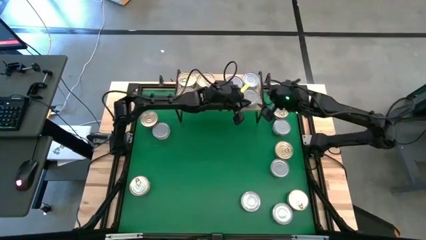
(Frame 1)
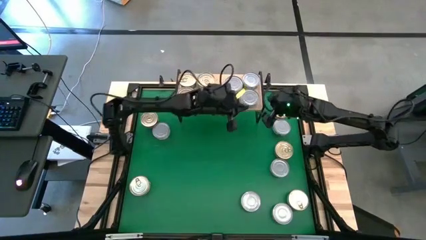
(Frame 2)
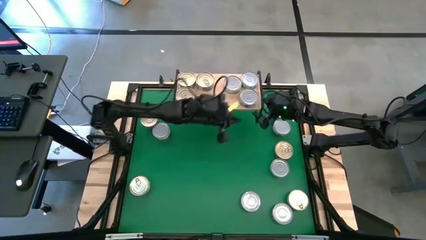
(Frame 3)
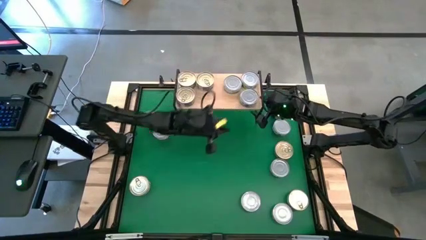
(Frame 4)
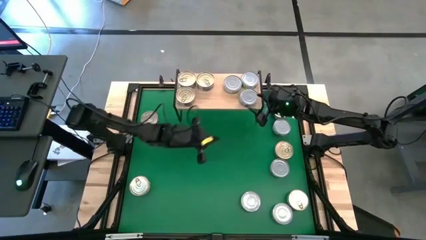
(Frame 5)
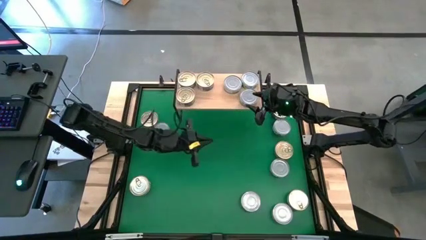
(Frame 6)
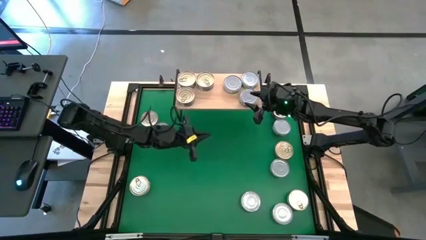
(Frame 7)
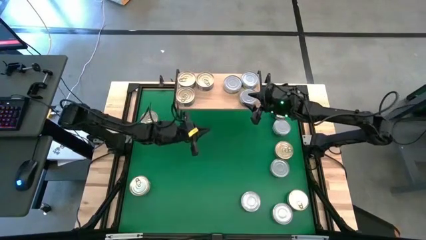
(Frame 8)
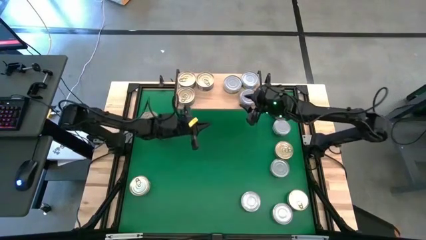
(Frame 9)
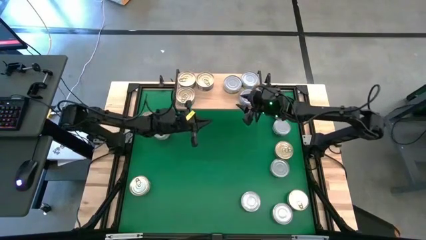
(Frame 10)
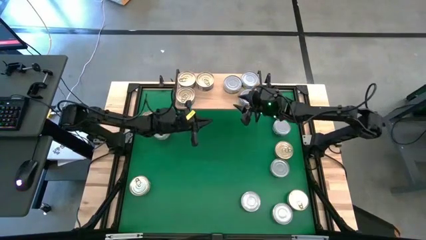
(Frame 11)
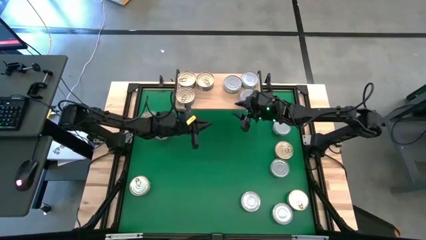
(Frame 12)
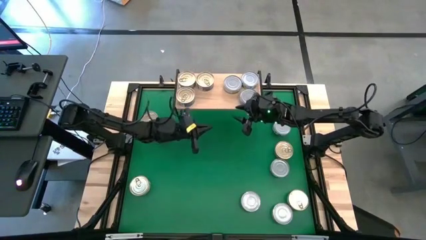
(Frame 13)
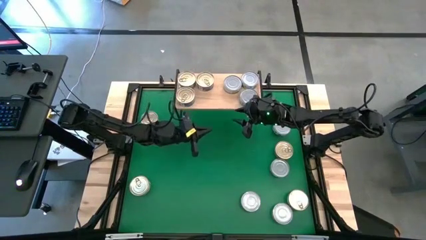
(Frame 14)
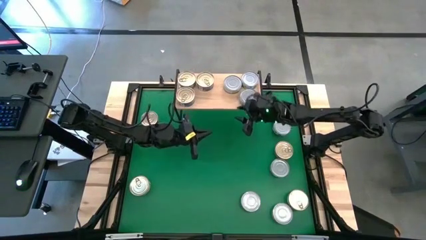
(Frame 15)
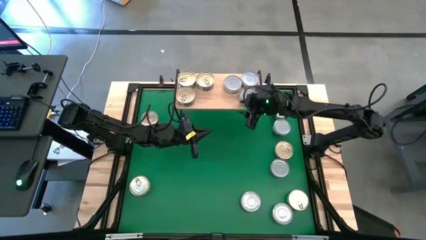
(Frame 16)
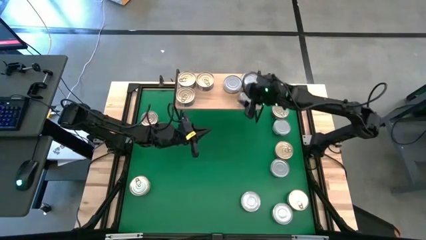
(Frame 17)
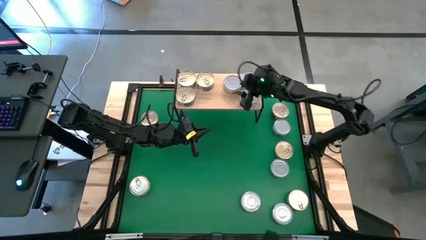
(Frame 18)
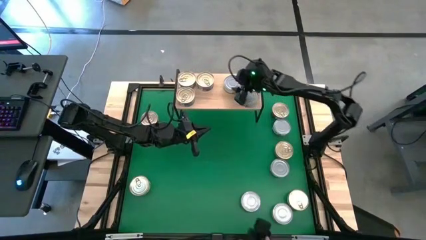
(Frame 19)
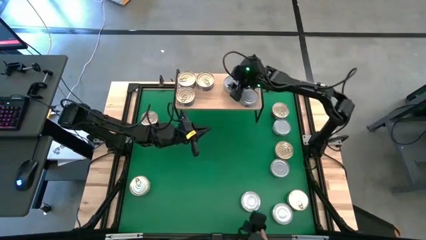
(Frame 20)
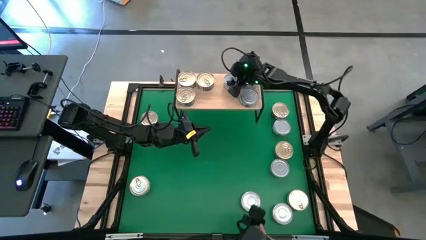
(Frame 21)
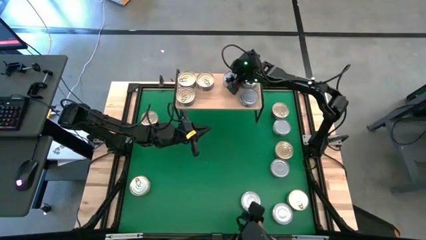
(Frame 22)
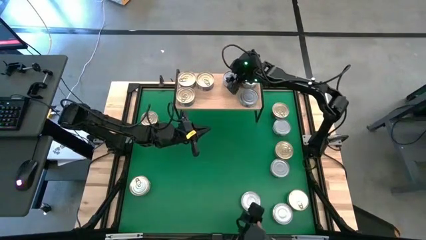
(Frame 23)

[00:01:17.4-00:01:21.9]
Task: Stack canned seafood by type on shelf
Adjust the green tuna can on the shelf

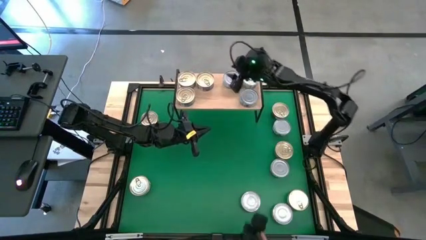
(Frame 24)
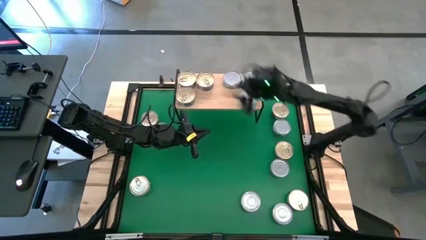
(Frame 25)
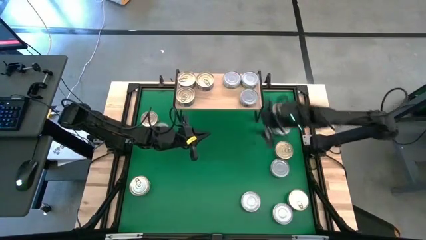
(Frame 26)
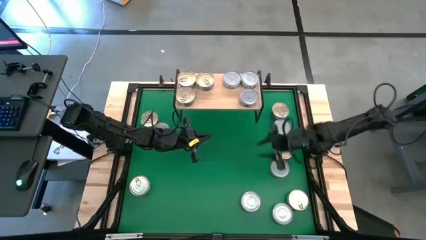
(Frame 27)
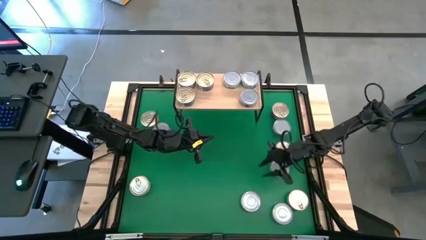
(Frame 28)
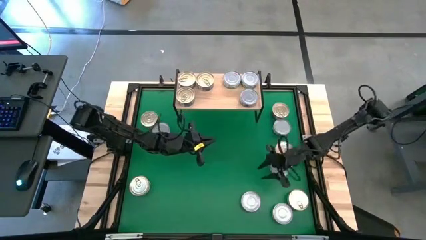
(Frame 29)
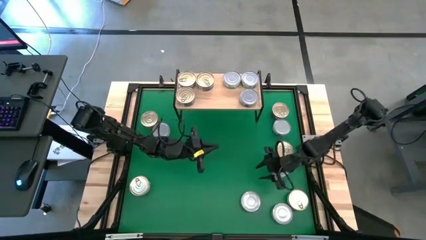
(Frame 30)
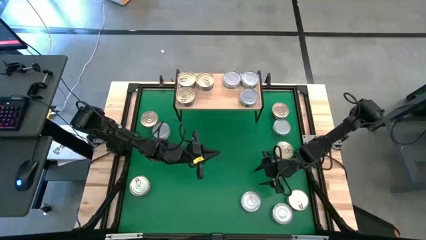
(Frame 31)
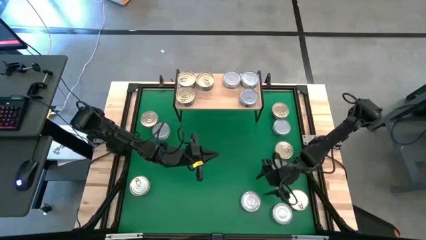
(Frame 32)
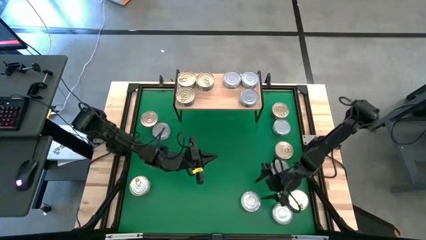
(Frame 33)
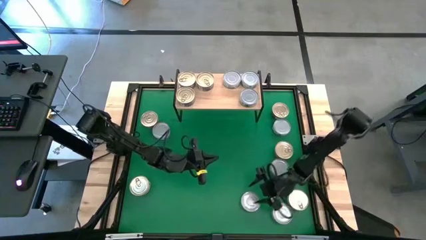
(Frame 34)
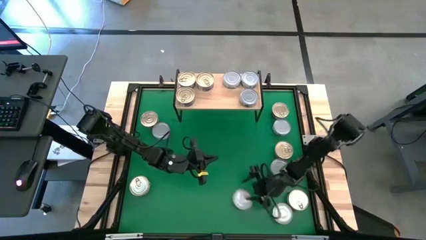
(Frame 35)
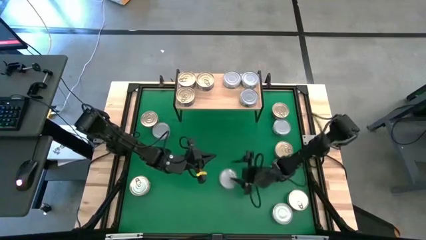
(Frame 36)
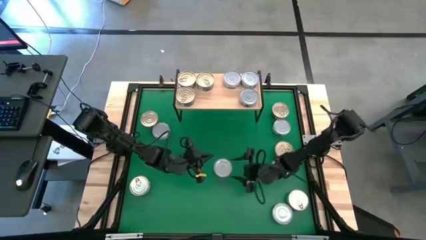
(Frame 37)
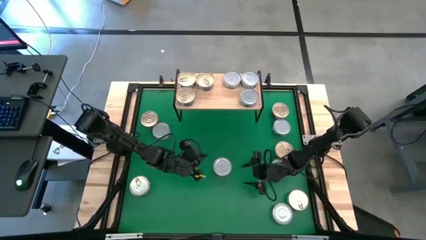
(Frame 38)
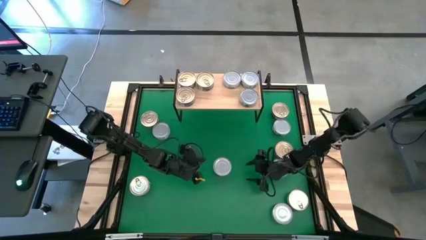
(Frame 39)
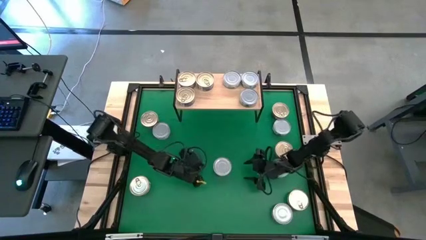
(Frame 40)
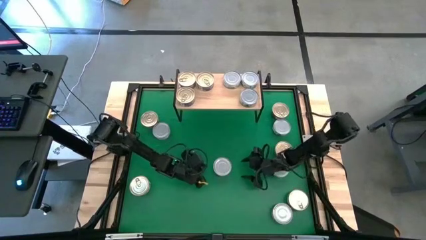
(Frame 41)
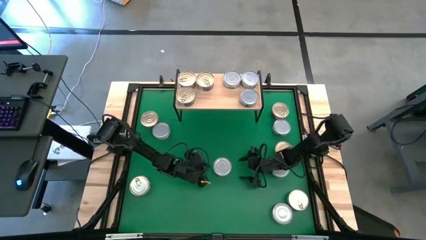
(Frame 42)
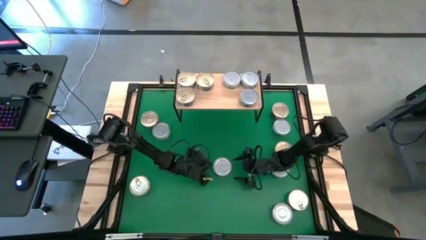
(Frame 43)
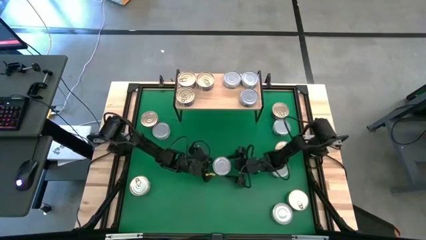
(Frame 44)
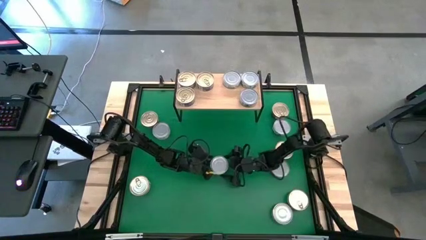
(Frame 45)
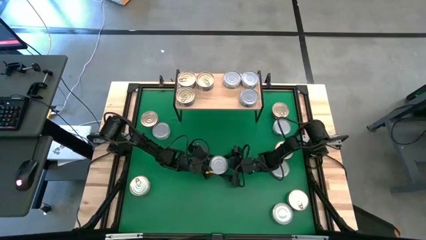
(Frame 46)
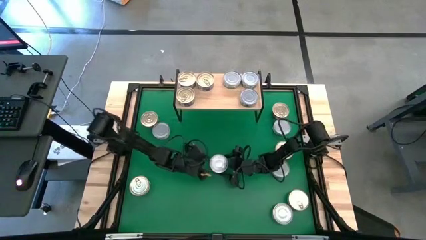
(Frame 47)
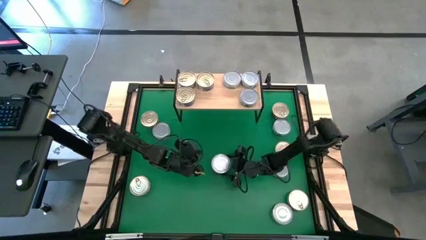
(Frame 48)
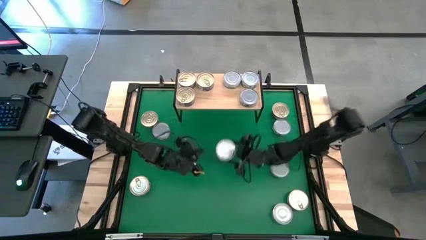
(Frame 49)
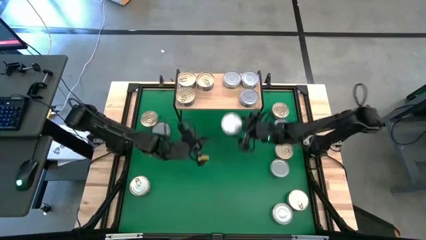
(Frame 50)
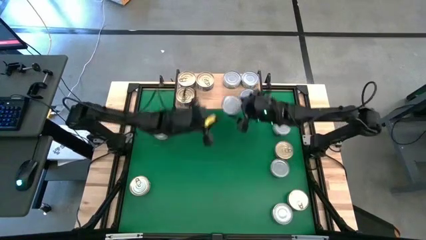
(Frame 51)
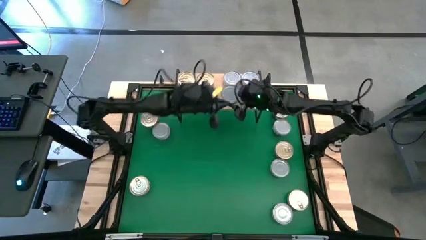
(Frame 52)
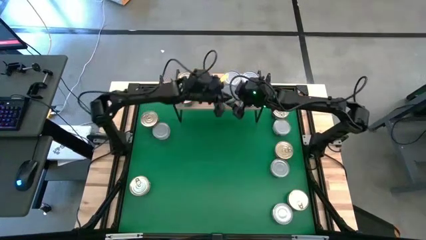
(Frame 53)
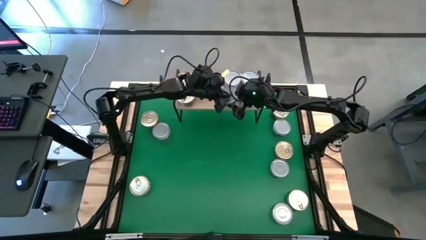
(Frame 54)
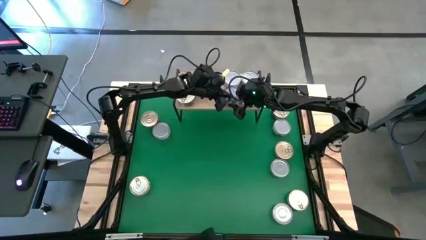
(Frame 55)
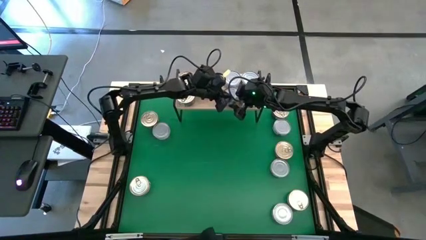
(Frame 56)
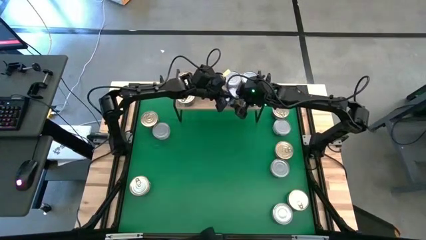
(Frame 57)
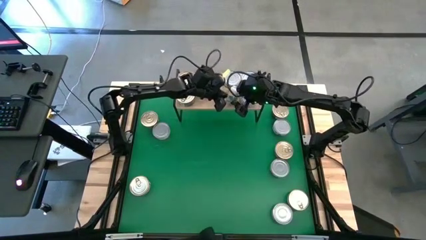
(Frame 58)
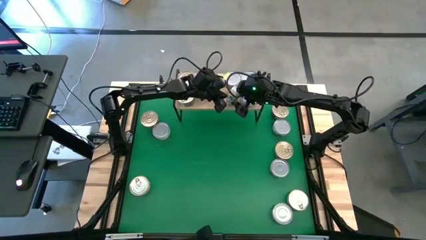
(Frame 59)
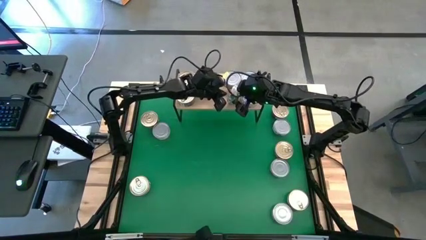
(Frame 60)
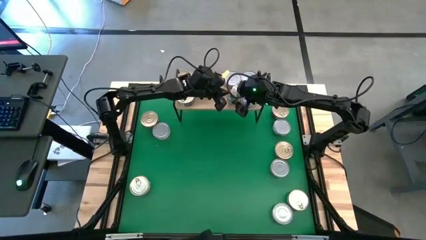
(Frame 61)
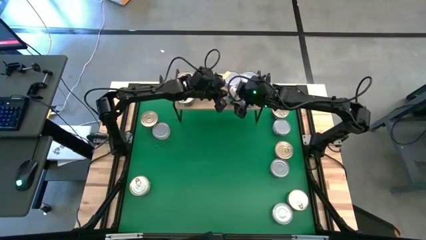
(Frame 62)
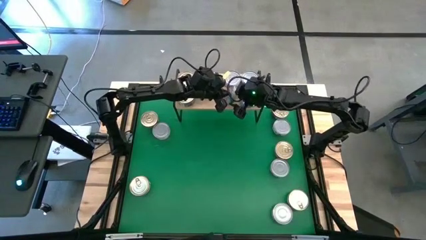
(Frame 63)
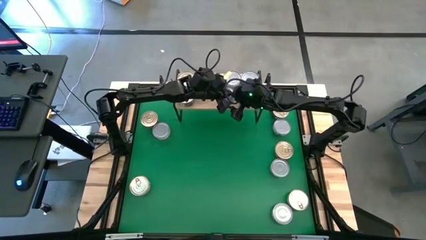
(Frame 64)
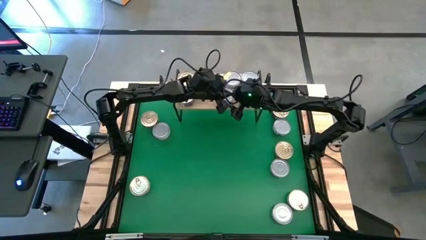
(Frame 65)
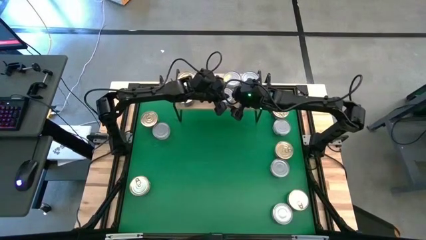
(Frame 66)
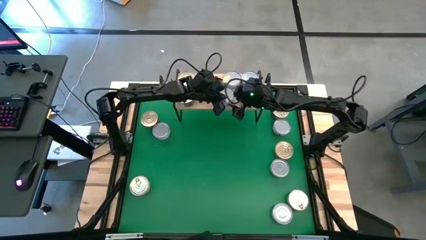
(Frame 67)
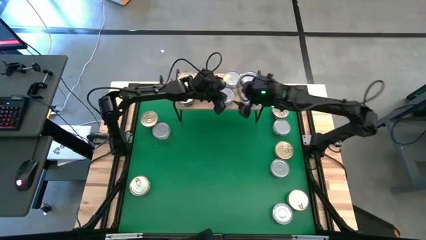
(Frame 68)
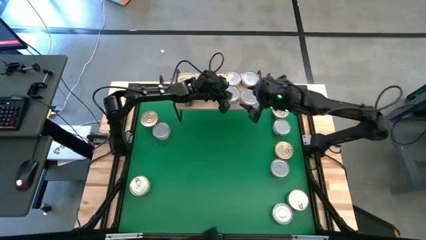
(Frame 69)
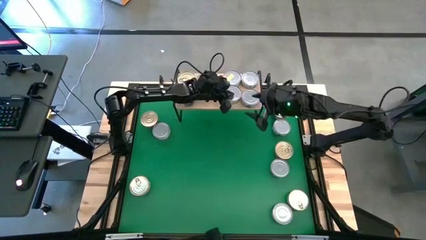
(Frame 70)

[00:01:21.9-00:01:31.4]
Put the green tuna can on the shelf aligned with the other green tuna can

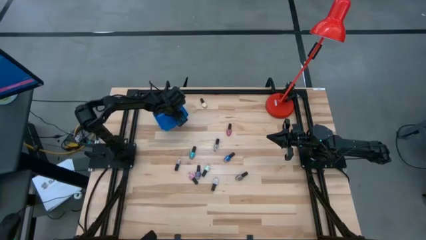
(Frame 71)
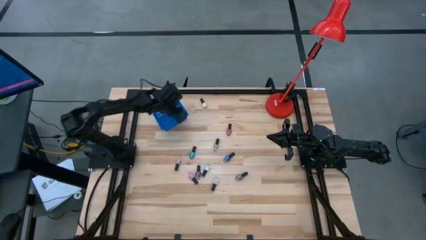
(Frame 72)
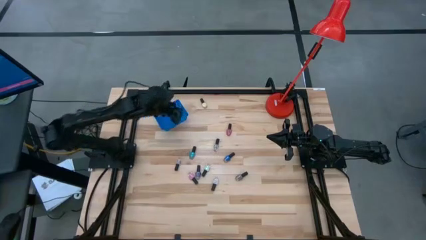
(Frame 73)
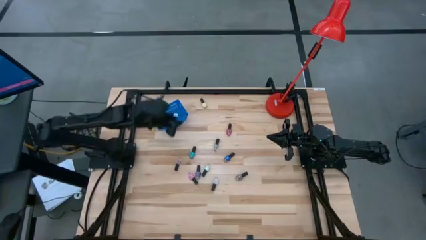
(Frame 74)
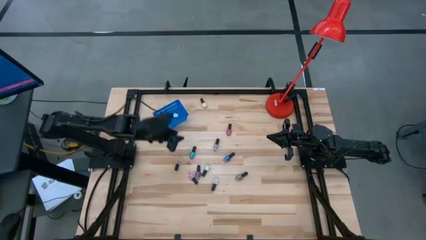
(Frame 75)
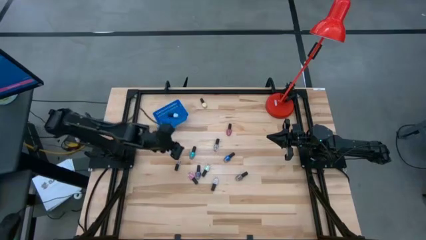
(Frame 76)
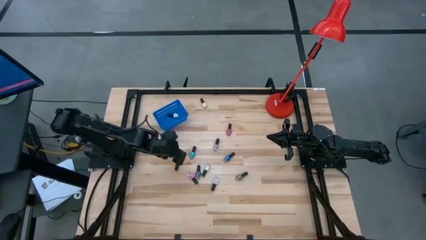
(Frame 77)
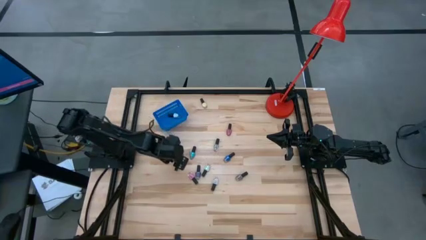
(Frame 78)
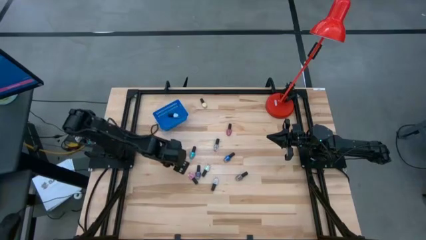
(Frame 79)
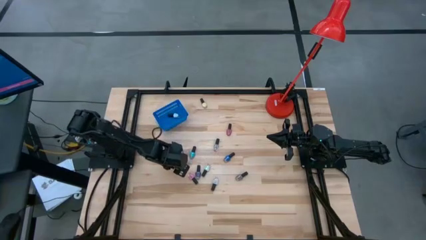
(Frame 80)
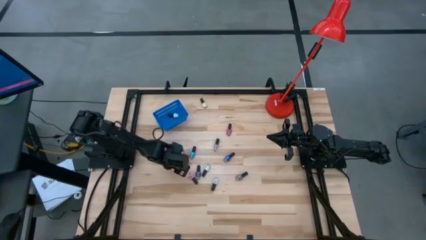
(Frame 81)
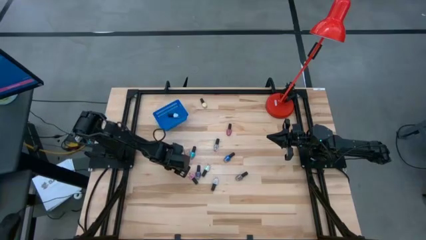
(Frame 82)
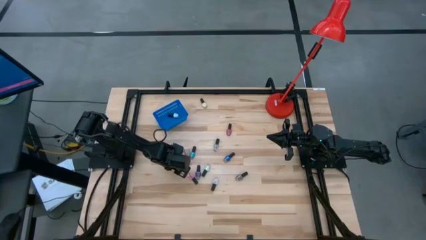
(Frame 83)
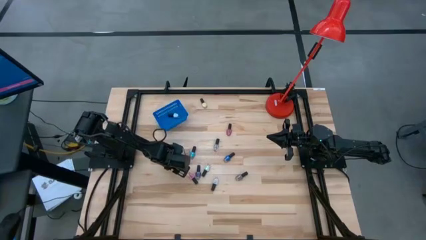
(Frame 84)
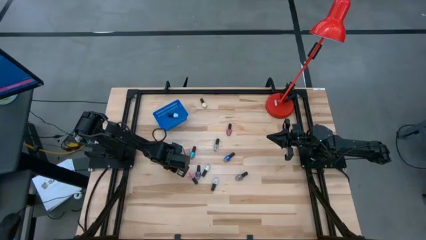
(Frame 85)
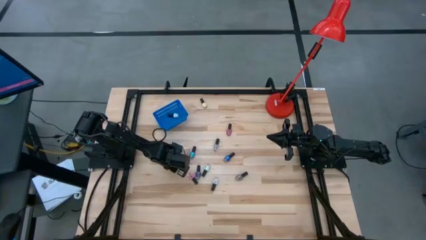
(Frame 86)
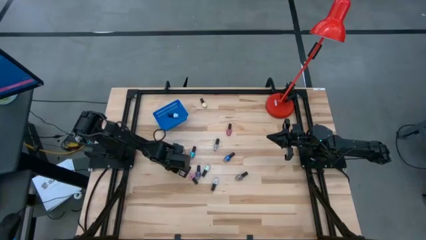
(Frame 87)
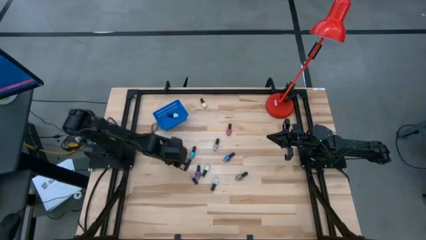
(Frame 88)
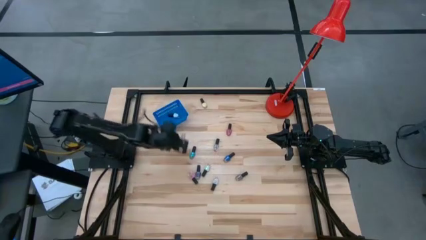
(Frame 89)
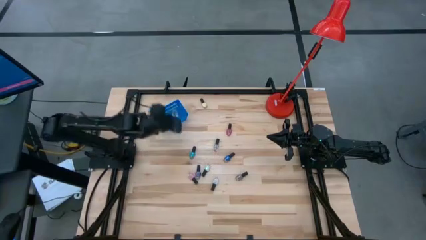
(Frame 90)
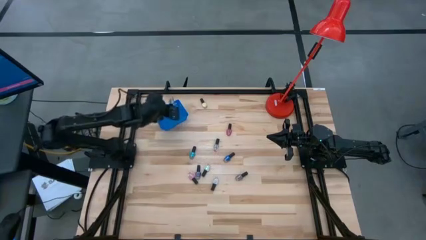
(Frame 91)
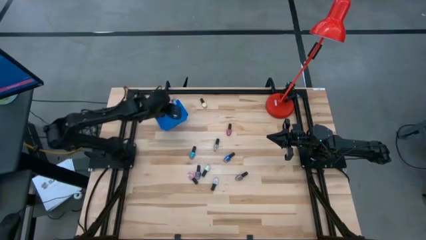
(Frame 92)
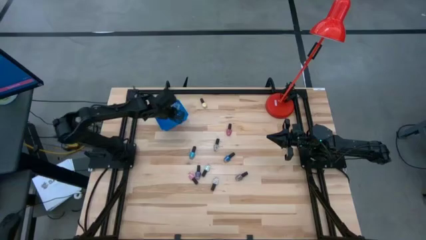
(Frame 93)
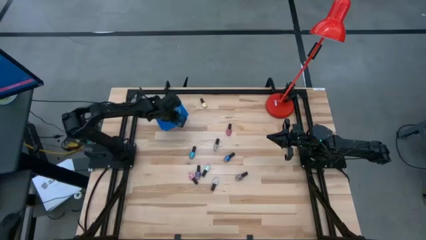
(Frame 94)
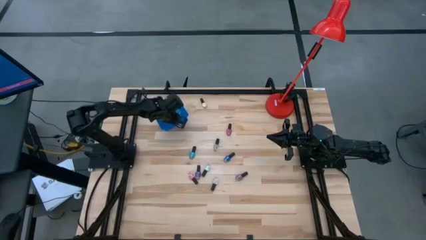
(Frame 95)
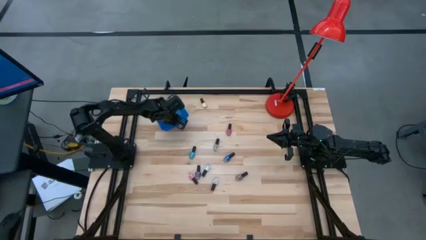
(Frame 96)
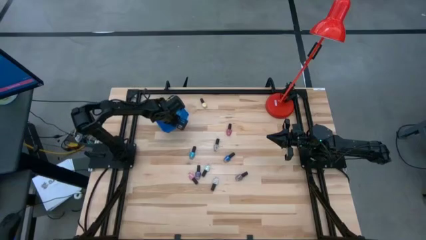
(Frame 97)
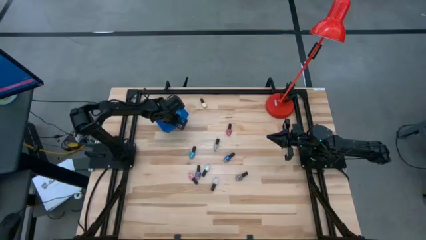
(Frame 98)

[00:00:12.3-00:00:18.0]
Task: Pick & Place Nail Polish
Put the bottom transparent nail polish bottle into the blue bin
